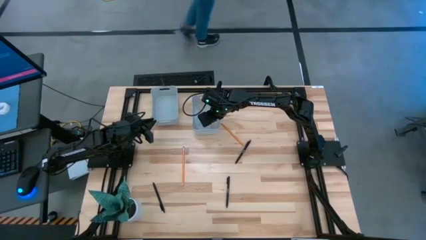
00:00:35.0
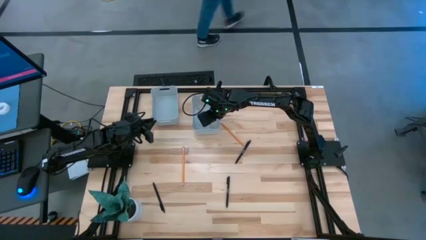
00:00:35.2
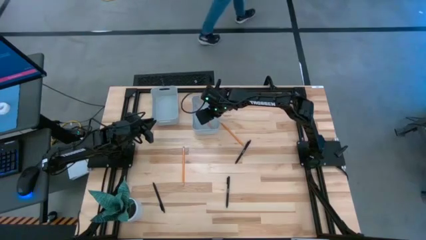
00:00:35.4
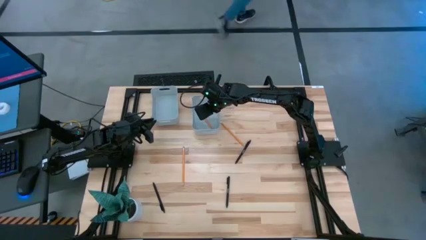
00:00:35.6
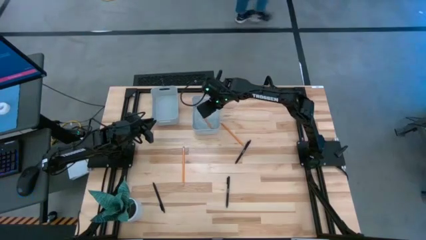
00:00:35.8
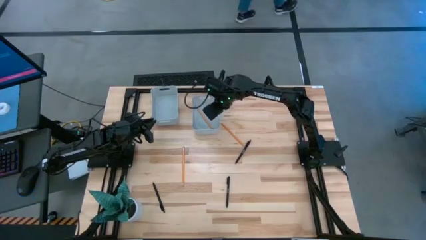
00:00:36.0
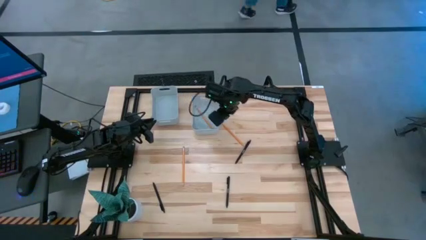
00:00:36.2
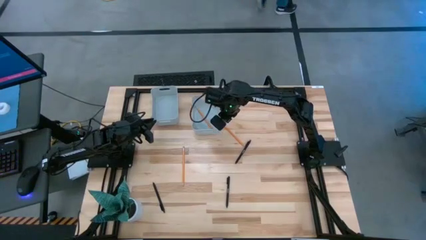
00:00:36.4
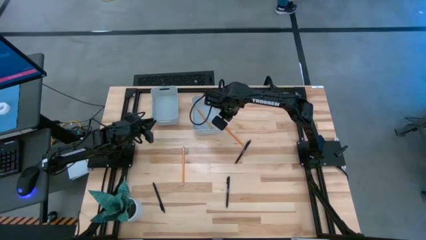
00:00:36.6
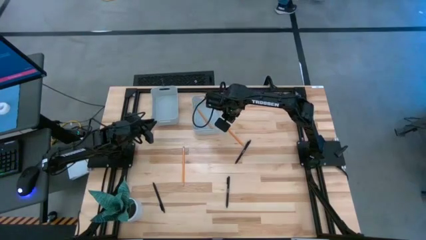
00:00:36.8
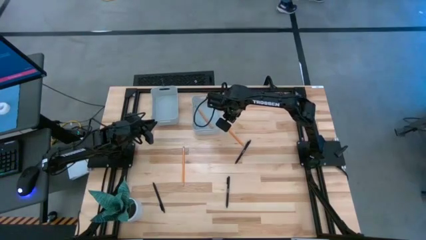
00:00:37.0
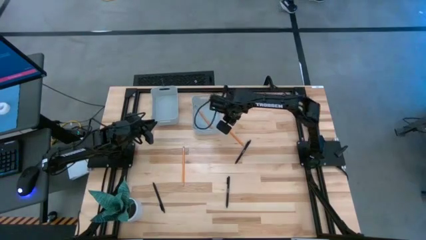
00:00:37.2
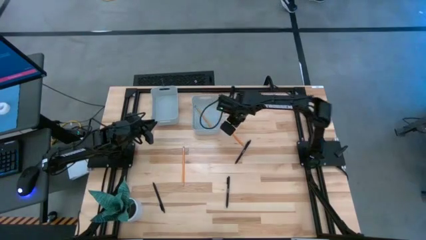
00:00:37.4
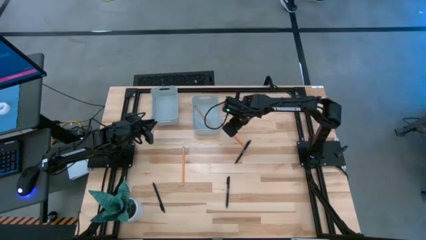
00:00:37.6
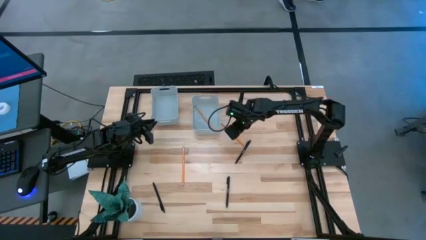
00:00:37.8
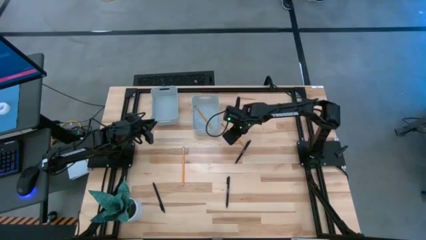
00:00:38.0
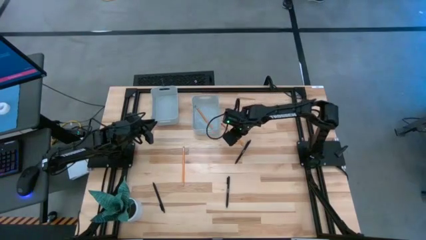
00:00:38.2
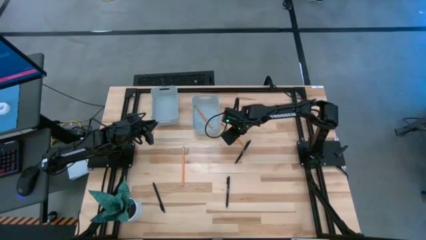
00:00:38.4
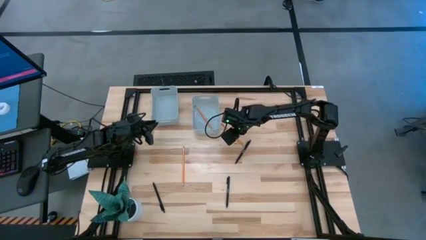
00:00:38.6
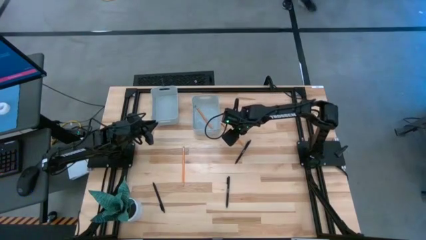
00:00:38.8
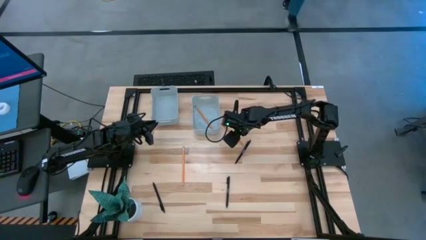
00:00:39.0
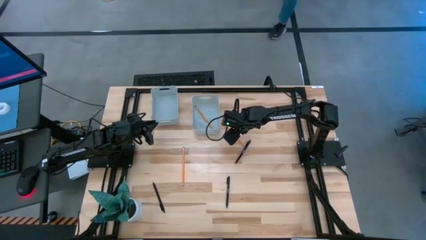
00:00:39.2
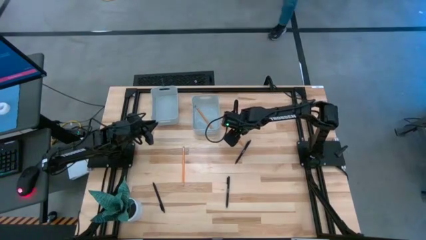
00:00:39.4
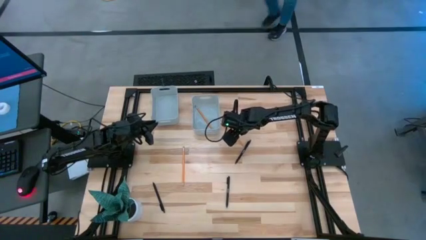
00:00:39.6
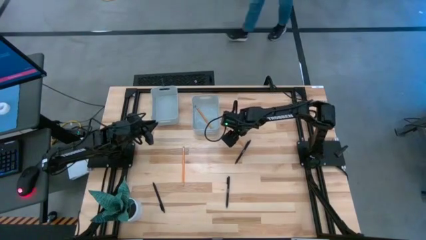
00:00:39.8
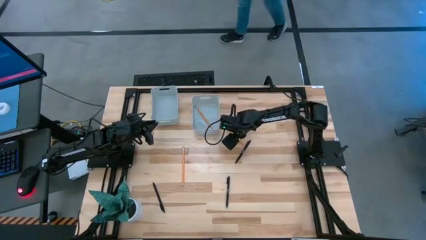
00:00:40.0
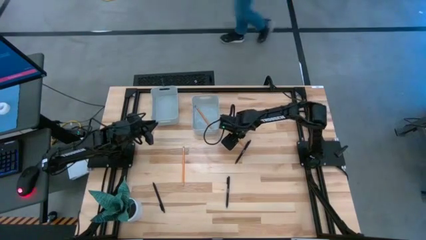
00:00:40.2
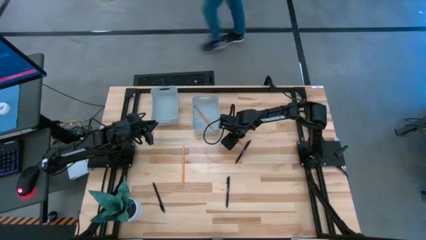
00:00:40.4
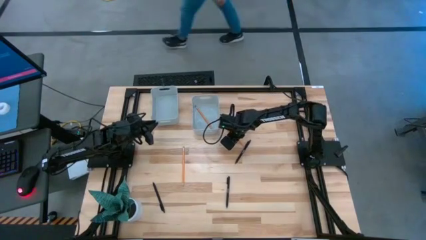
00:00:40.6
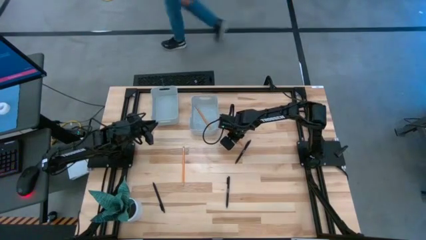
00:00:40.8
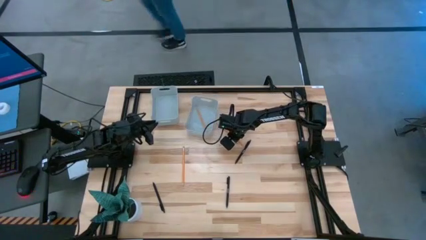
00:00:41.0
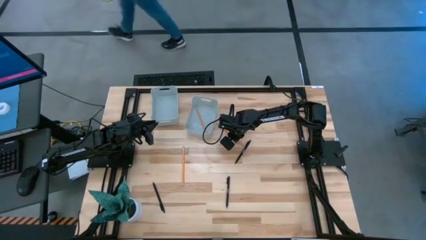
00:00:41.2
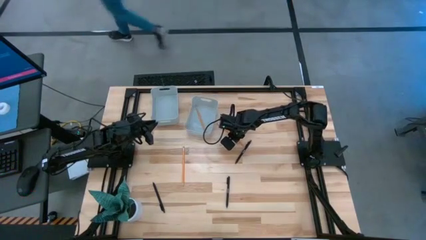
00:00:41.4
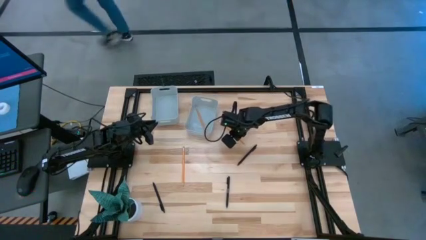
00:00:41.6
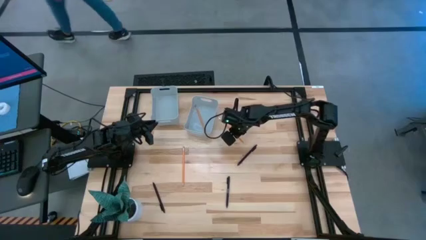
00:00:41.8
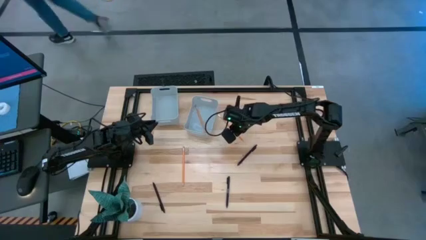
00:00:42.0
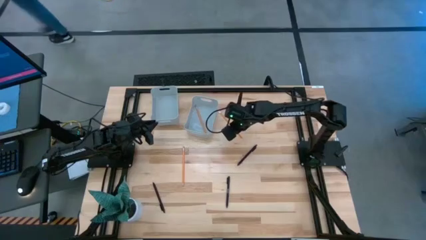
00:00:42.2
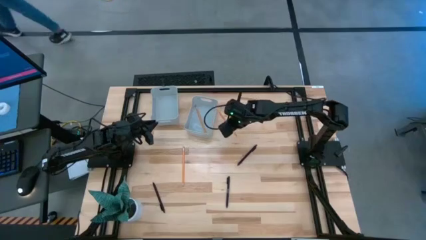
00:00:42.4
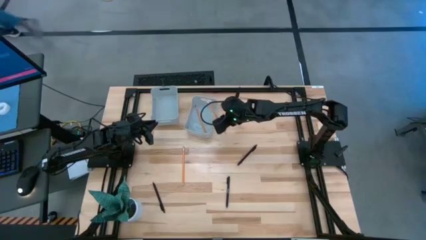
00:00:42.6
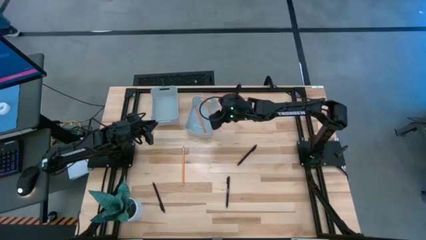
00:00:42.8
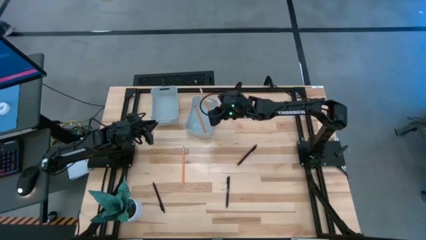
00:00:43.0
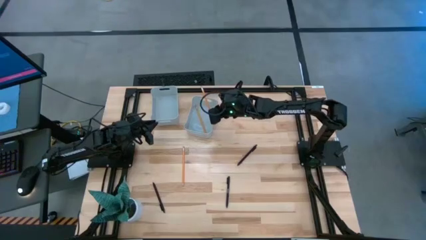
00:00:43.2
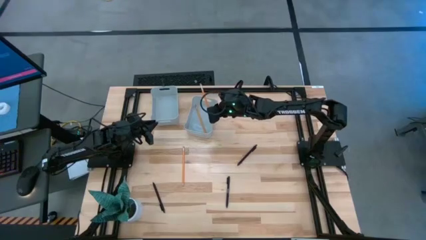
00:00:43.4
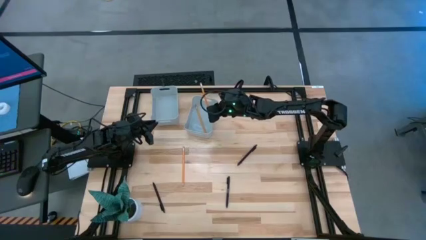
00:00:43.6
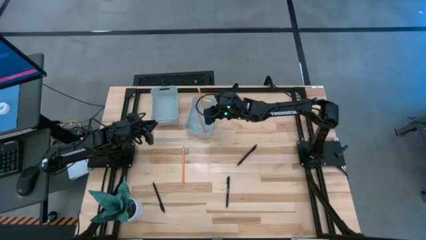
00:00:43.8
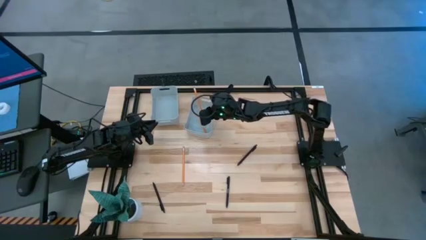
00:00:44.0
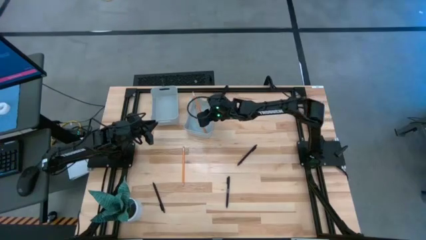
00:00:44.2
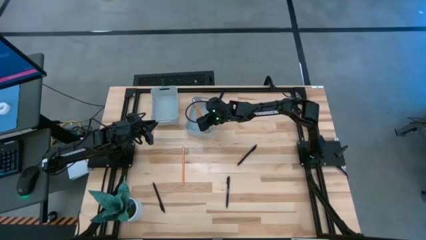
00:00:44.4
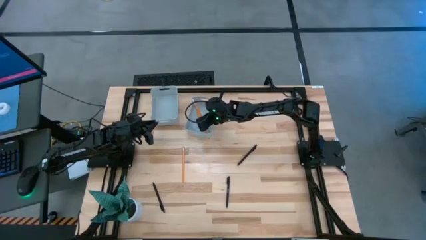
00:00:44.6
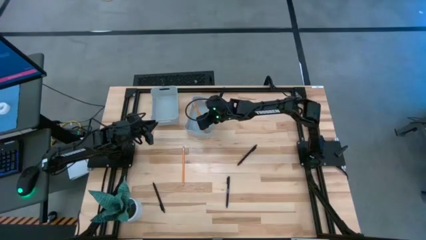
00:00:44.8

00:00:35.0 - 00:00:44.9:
Task: Sort pens & pencils
Put the top orange pencil into the right gray bin

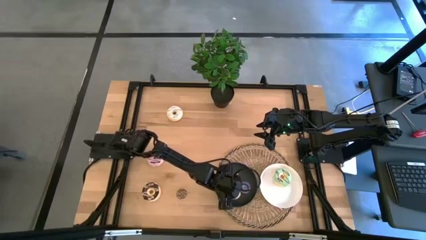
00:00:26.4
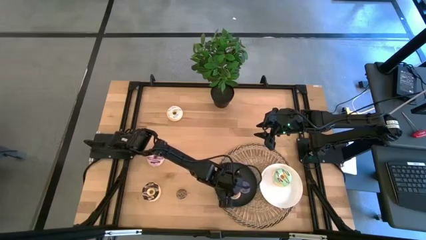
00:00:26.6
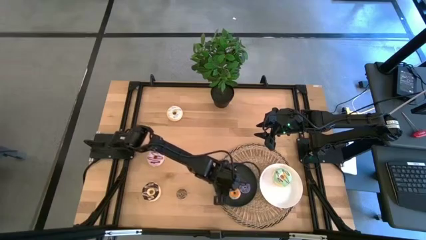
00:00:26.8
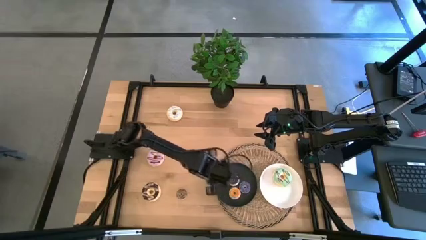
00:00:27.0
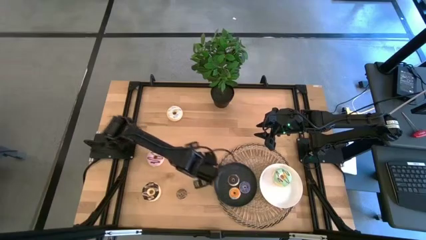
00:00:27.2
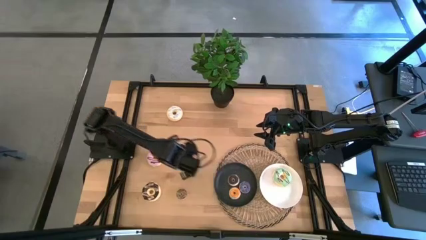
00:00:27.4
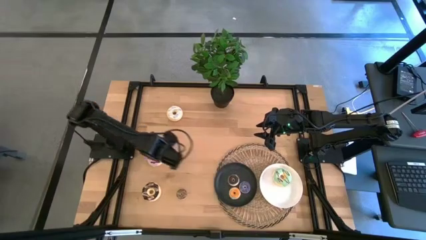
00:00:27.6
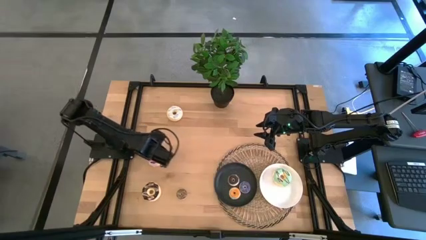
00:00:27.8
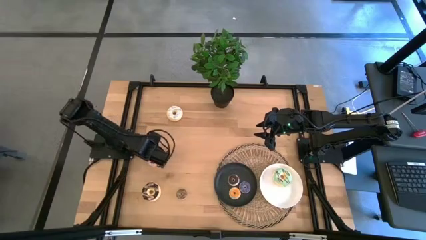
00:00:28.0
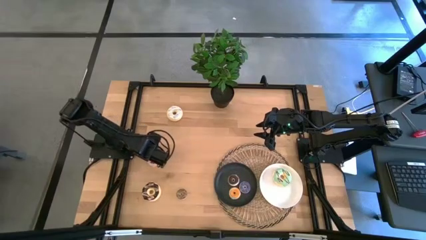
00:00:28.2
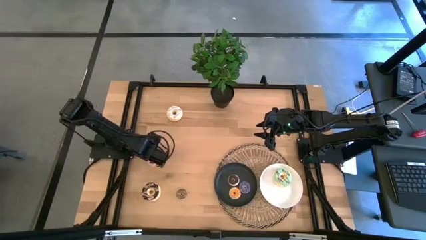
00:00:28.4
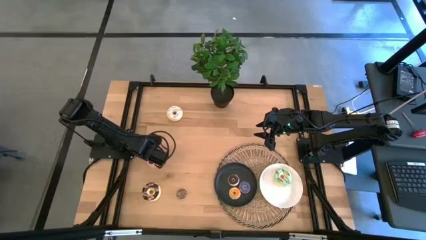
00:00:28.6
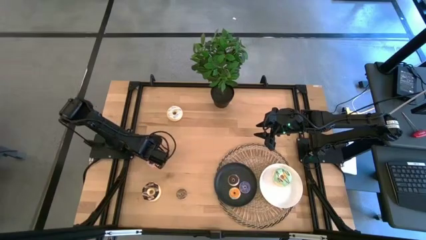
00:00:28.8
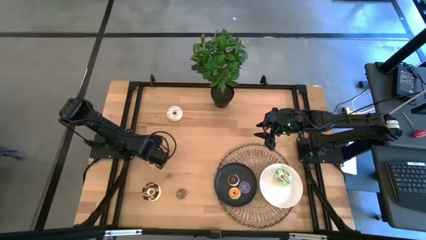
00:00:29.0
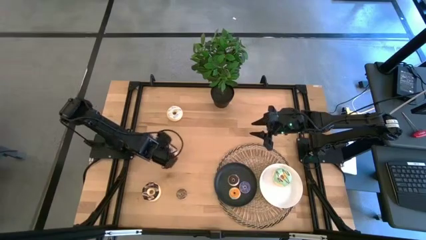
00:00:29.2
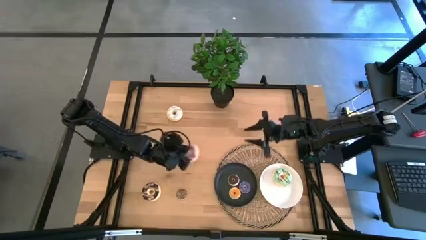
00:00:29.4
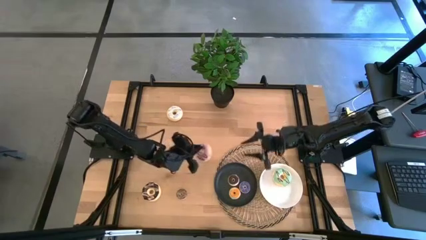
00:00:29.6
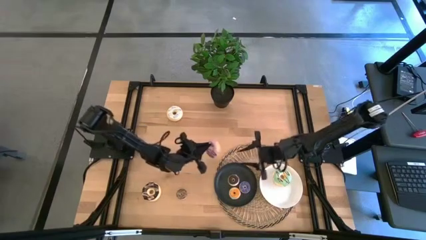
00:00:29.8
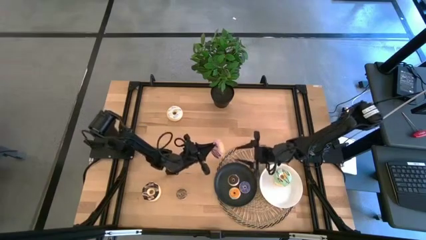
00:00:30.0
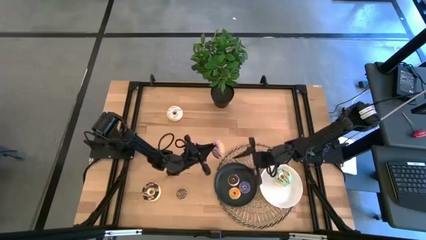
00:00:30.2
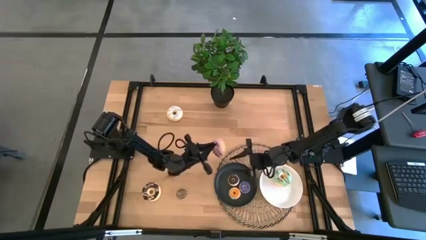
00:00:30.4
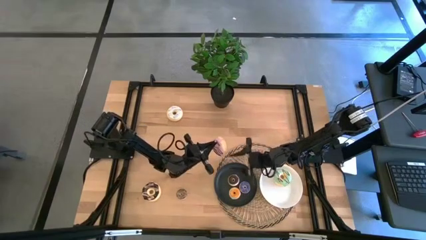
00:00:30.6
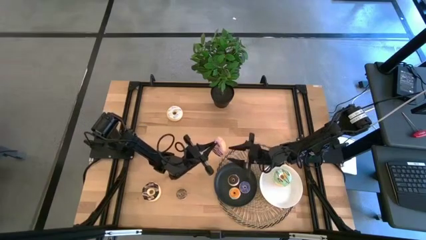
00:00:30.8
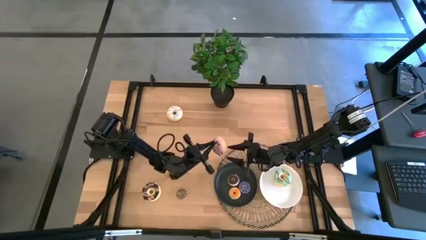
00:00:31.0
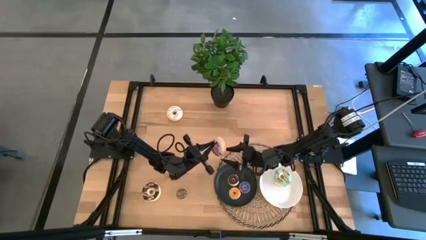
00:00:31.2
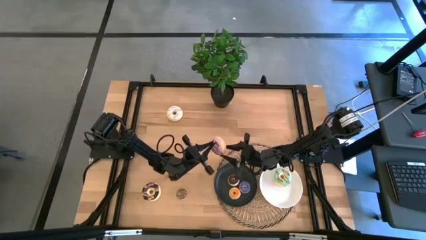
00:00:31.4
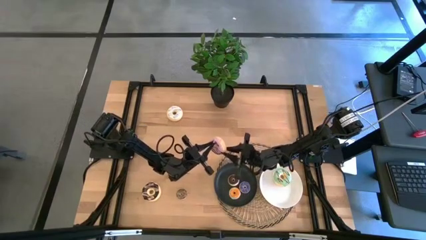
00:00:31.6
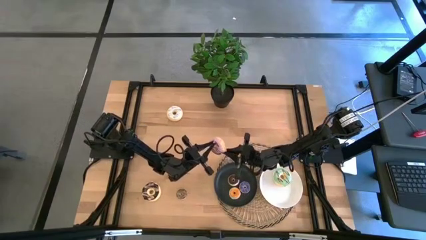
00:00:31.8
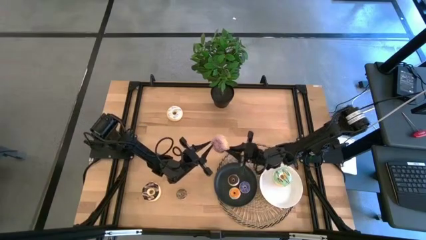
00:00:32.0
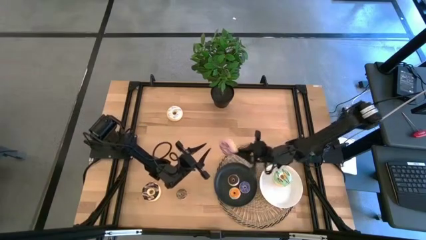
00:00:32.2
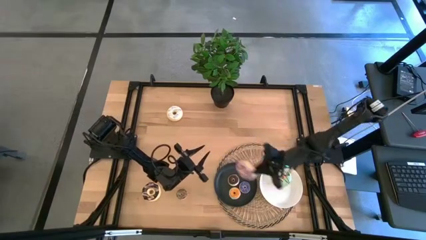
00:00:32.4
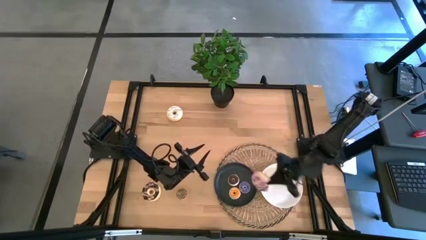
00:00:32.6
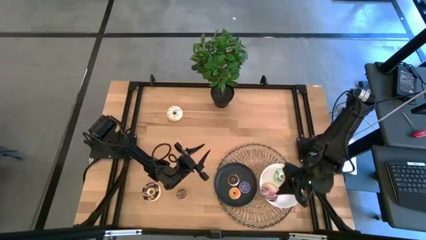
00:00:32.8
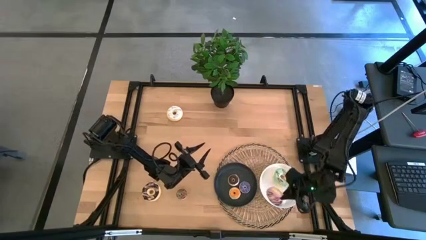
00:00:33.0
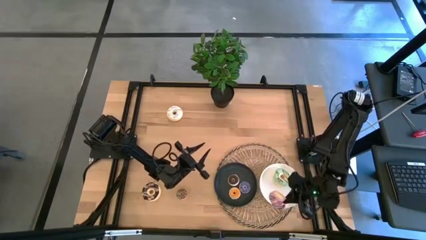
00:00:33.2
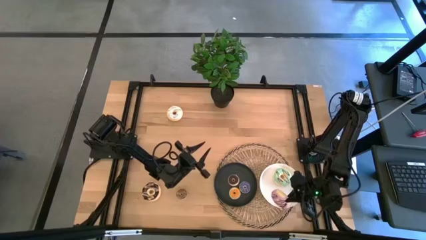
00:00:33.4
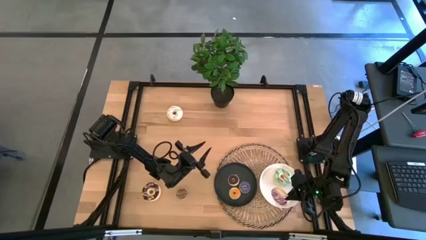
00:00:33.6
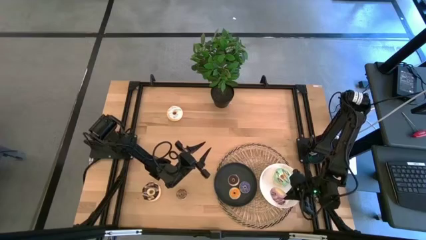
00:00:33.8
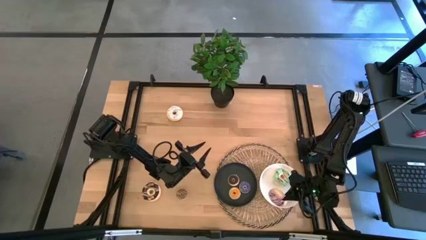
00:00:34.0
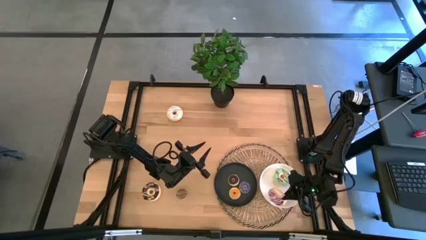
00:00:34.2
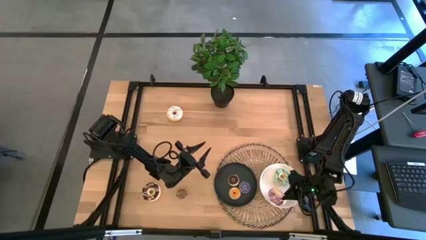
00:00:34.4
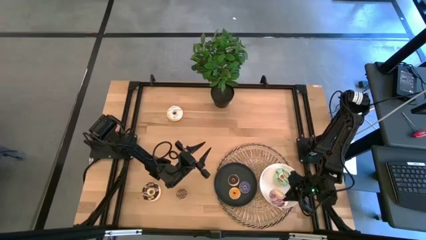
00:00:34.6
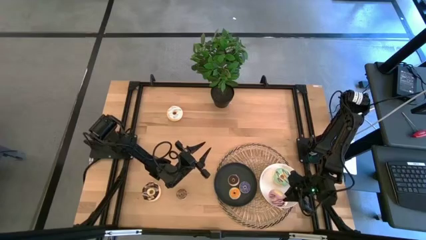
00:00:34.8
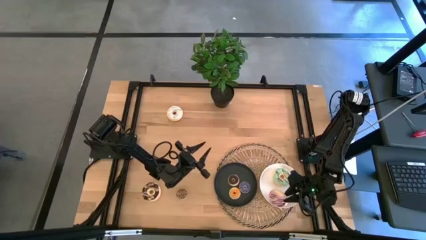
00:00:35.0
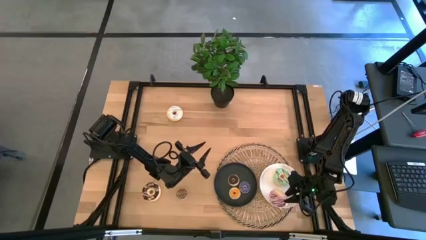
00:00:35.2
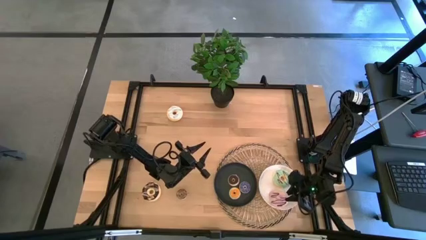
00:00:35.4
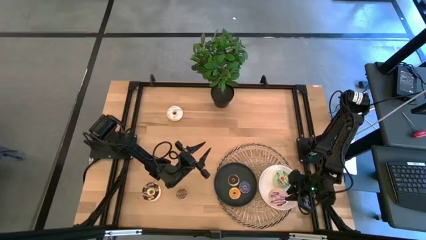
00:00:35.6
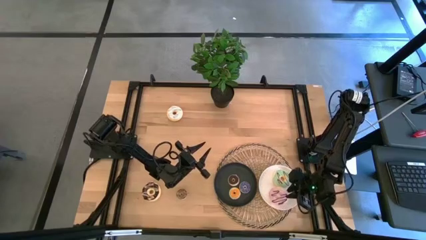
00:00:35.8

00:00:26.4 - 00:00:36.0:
Task: Pick & Place donuts
Put the big purple donut on the white plate
